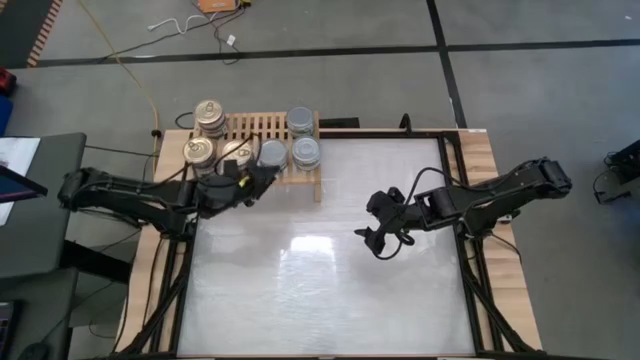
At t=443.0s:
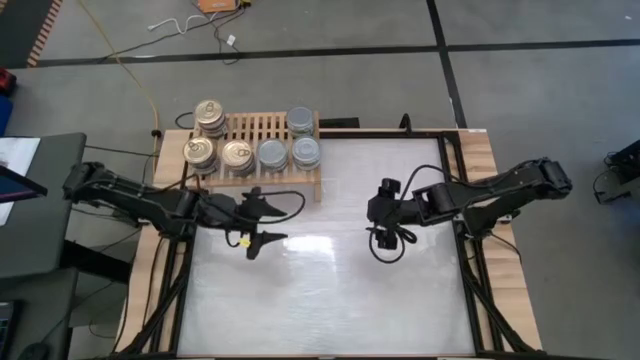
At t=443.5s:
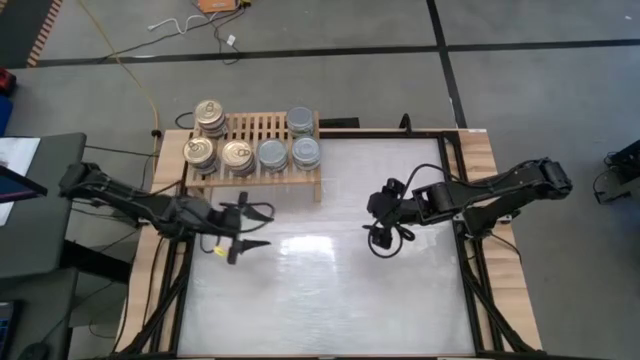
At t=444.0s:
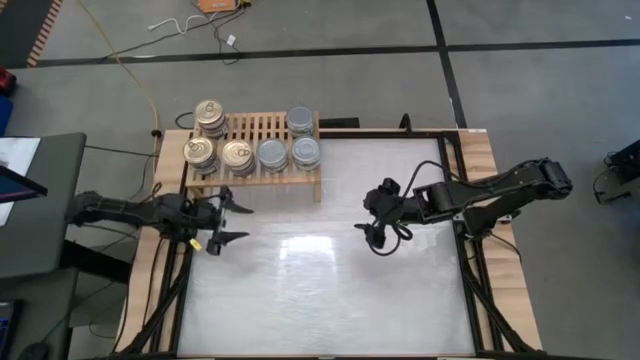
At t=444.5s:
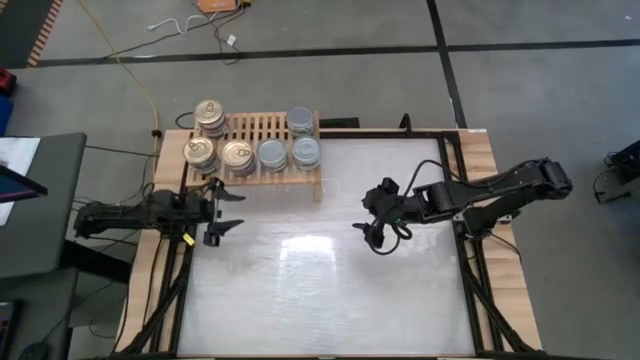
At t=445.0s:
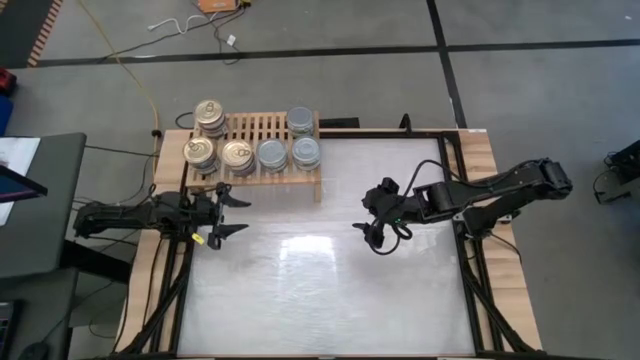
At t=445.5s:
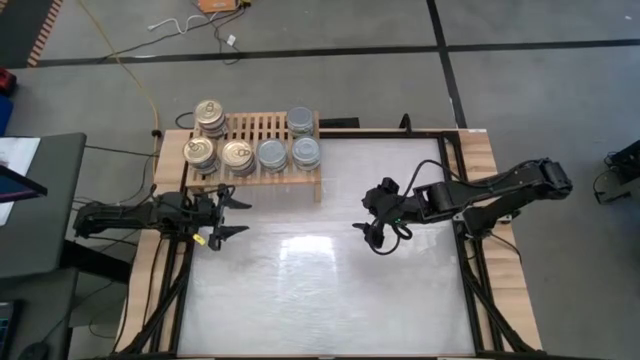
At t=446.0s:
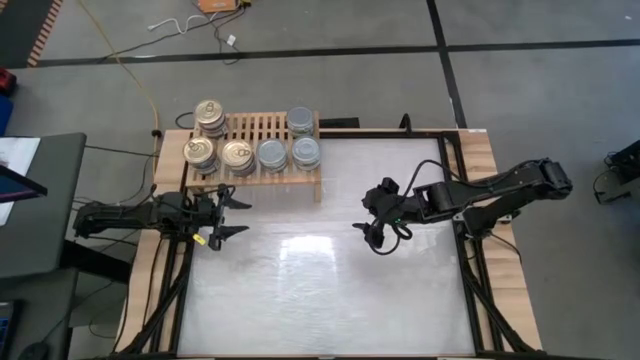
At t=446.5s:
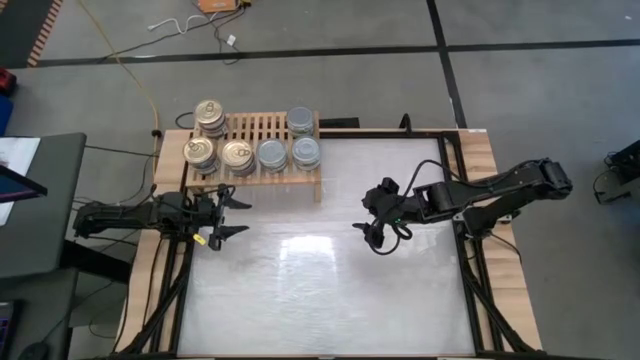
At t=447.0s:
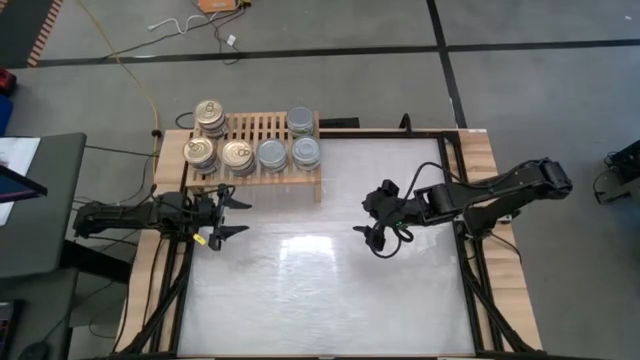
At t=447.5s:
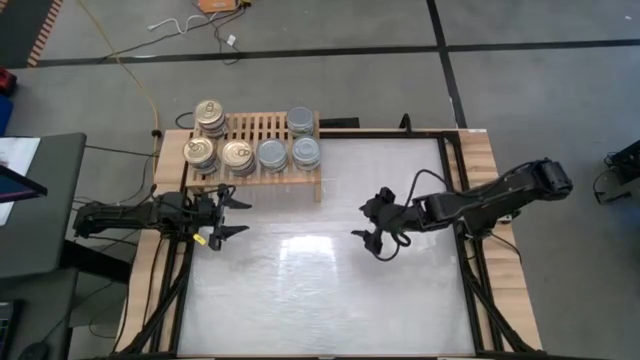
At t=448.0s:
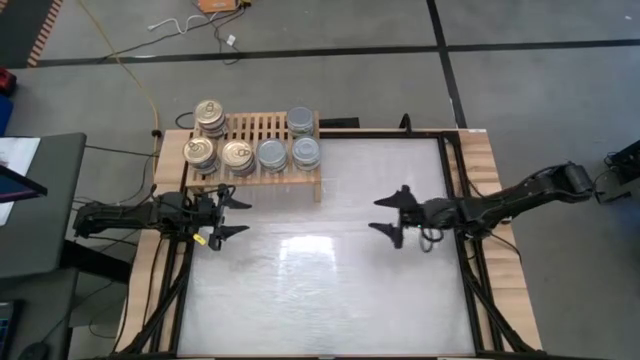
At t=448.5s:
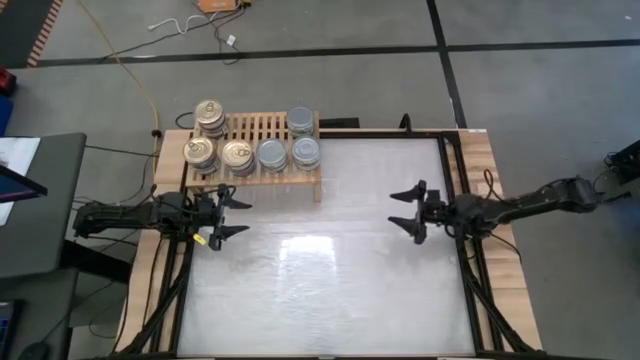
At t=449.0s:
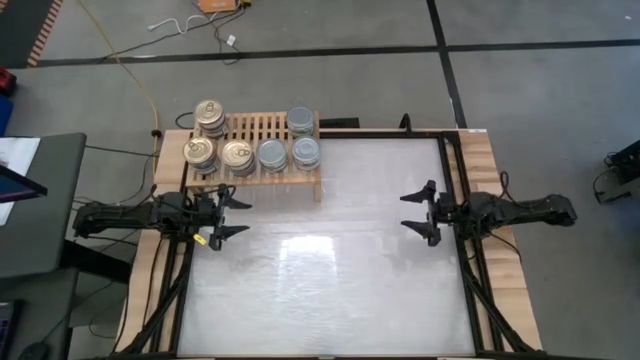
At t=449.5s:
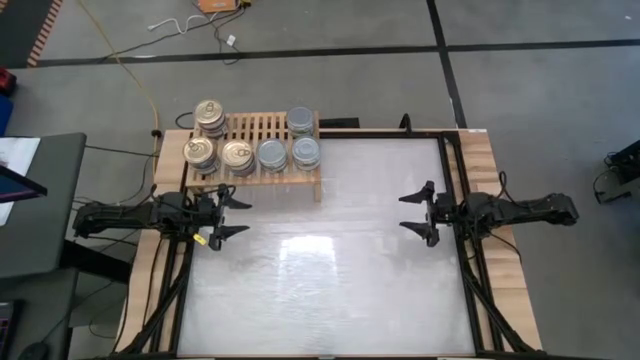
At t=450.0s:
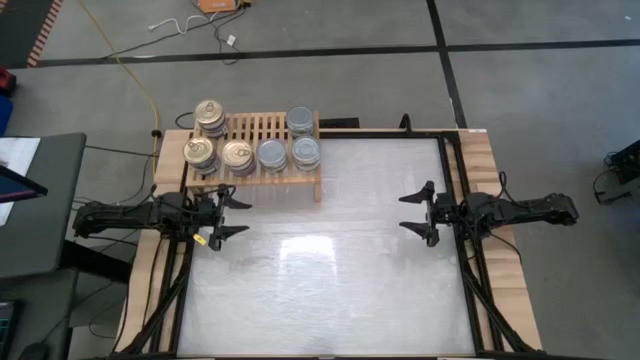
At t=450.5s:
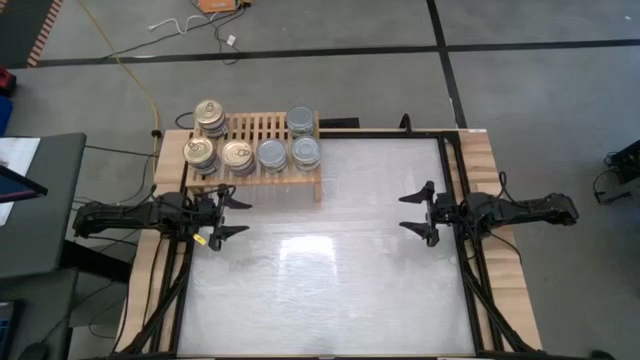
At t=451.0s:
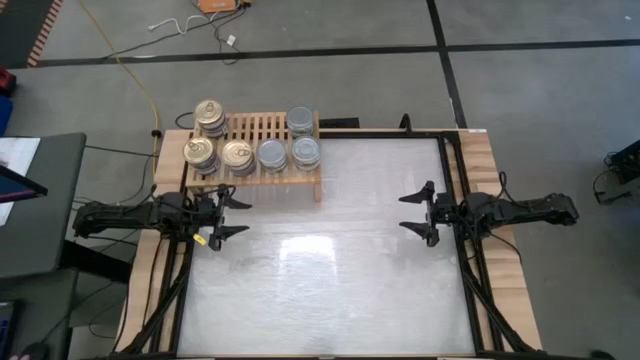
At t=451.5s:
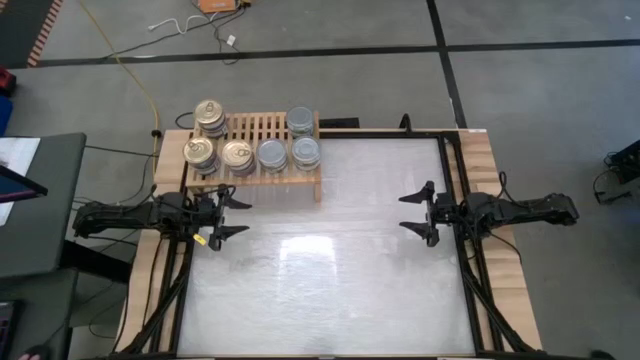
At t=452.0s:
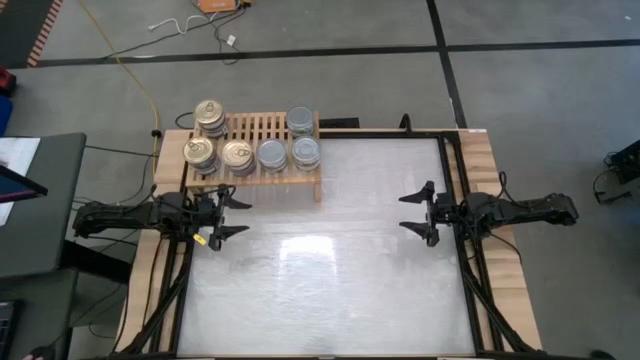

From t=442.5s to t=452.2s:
Task: Stack canned seafood by type on shelf
Return to Home Position

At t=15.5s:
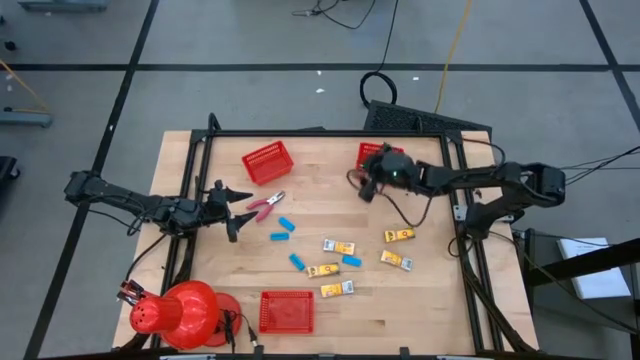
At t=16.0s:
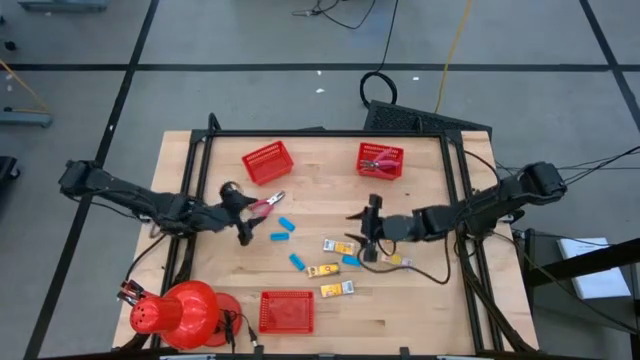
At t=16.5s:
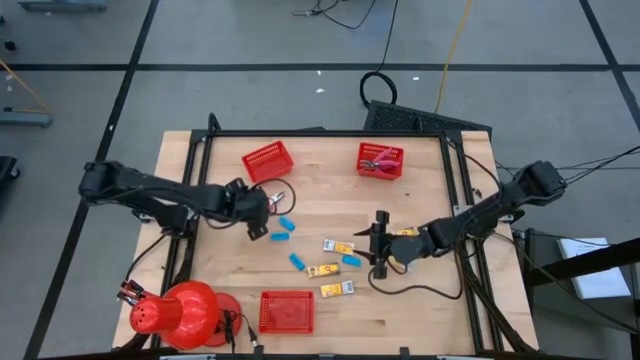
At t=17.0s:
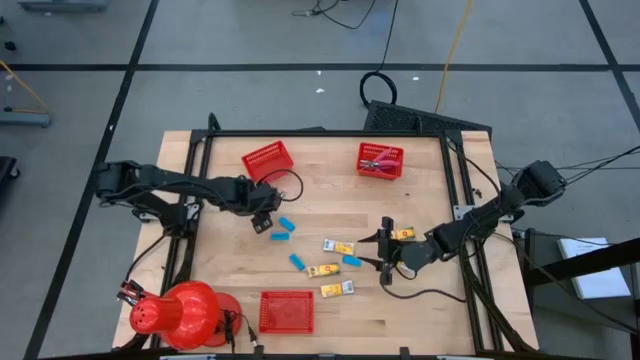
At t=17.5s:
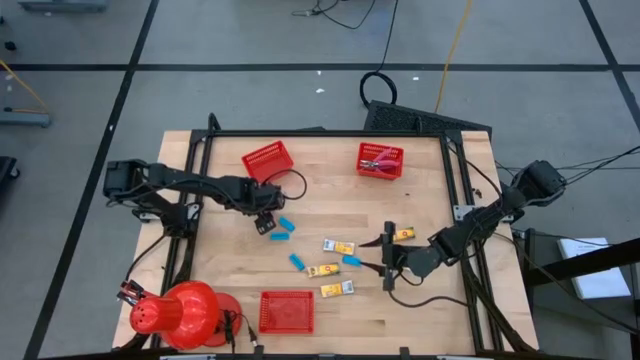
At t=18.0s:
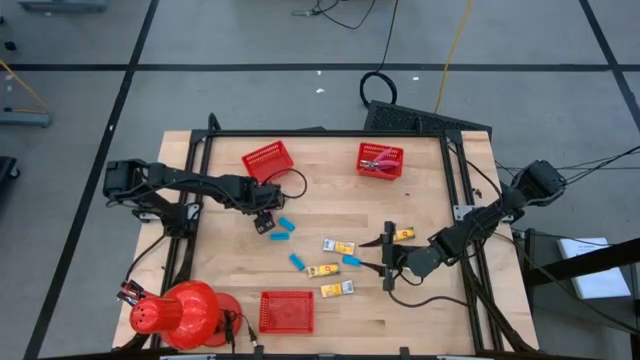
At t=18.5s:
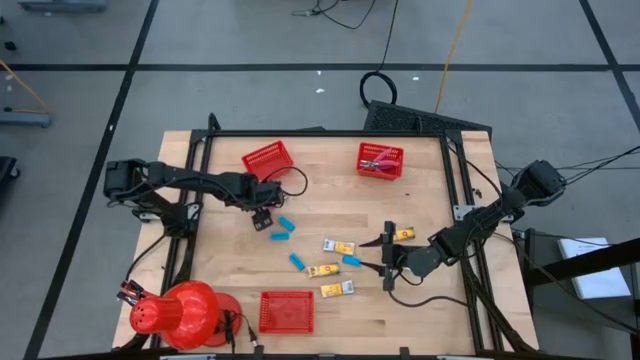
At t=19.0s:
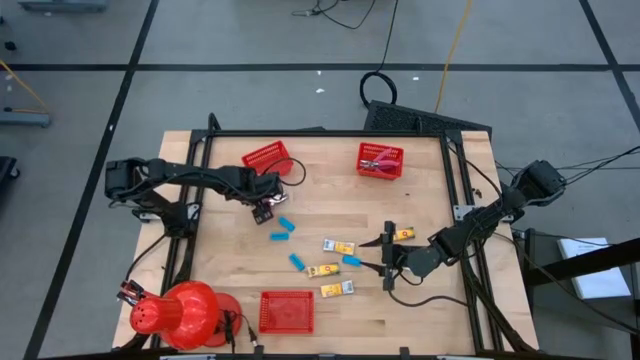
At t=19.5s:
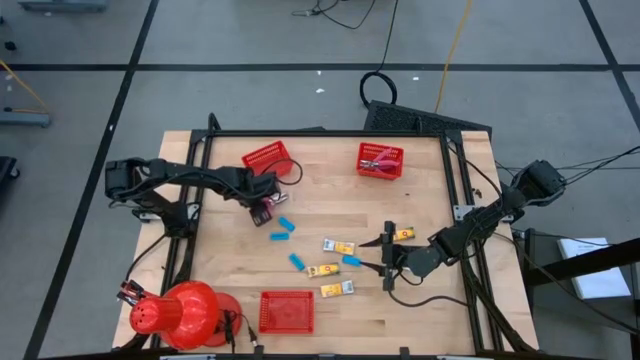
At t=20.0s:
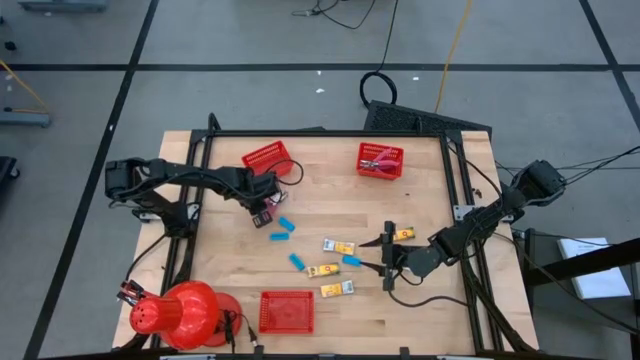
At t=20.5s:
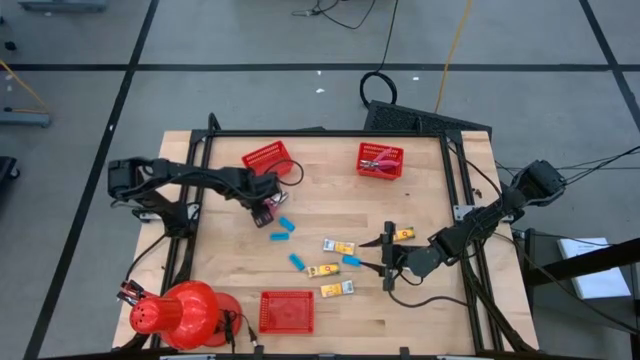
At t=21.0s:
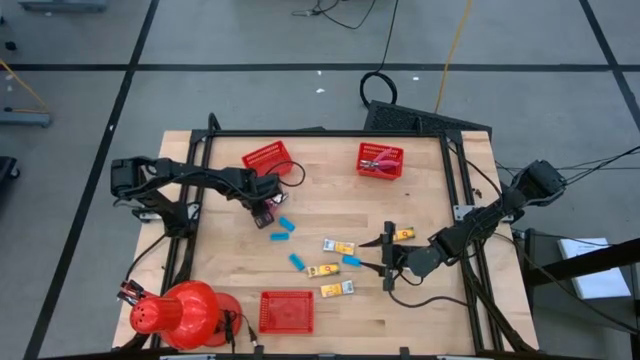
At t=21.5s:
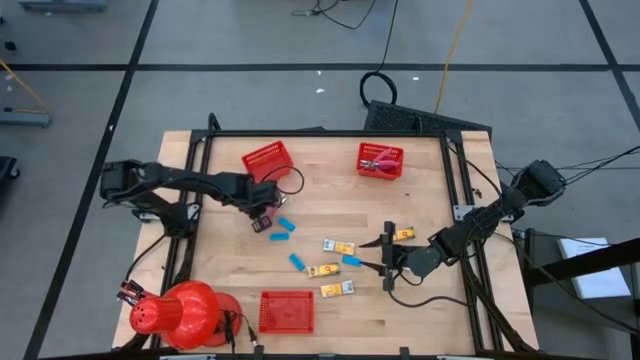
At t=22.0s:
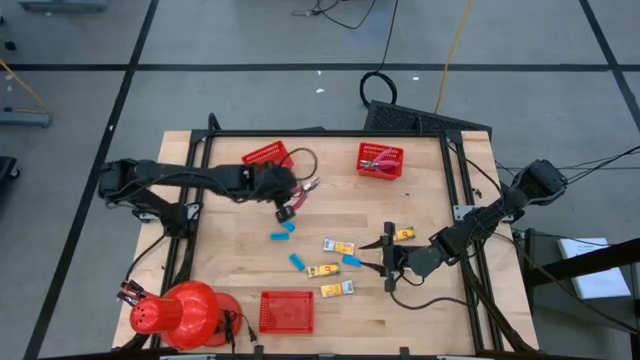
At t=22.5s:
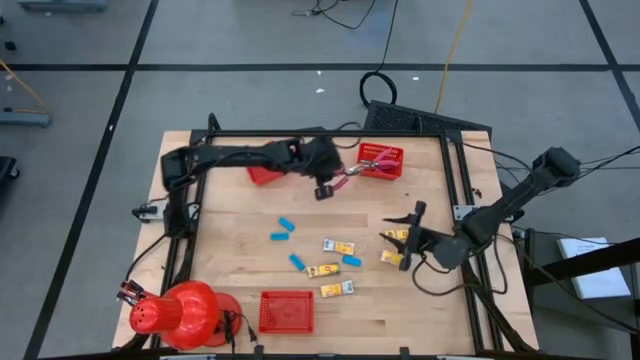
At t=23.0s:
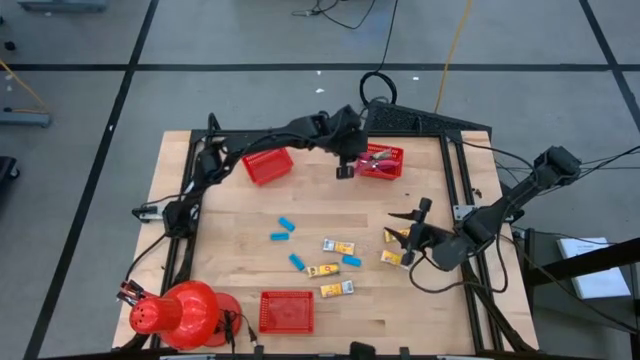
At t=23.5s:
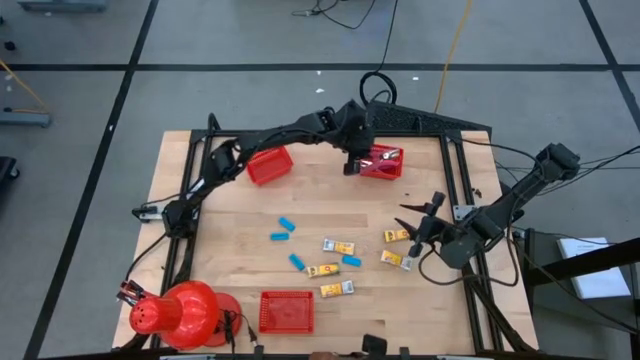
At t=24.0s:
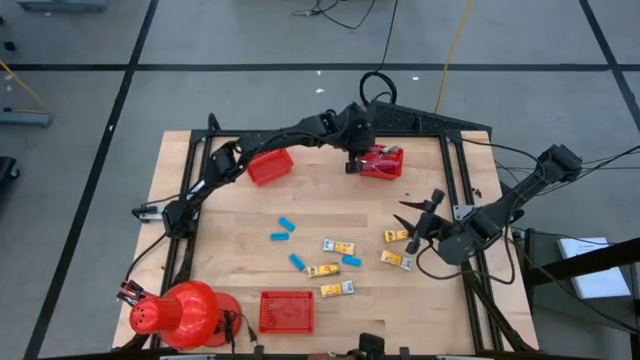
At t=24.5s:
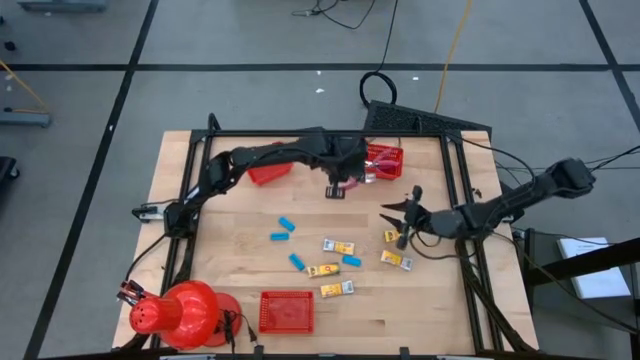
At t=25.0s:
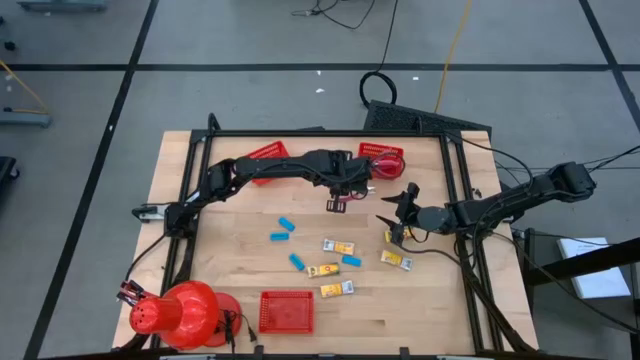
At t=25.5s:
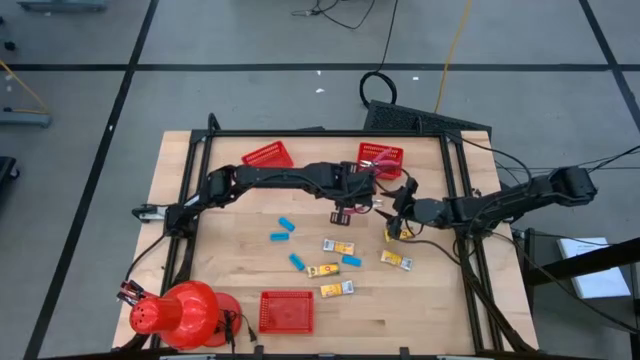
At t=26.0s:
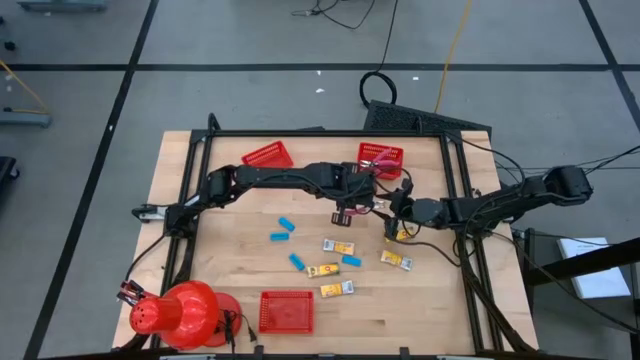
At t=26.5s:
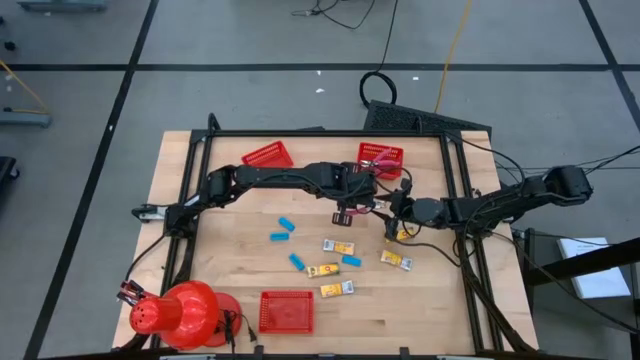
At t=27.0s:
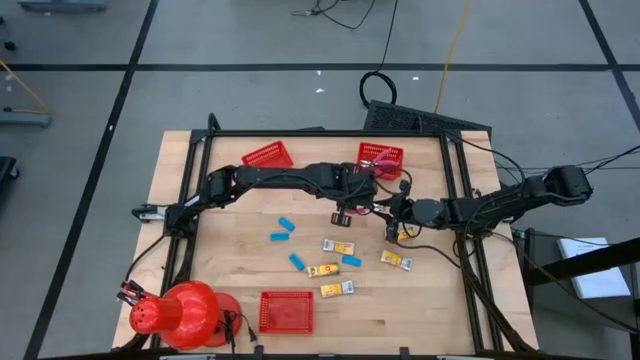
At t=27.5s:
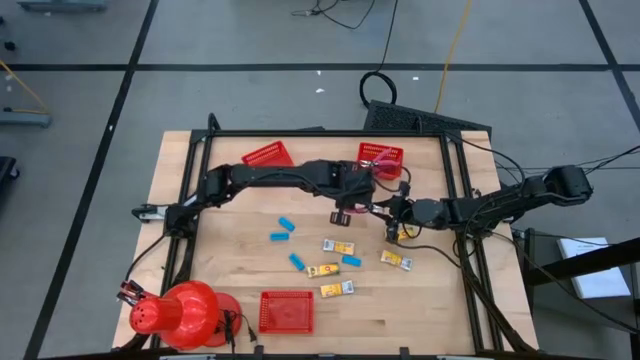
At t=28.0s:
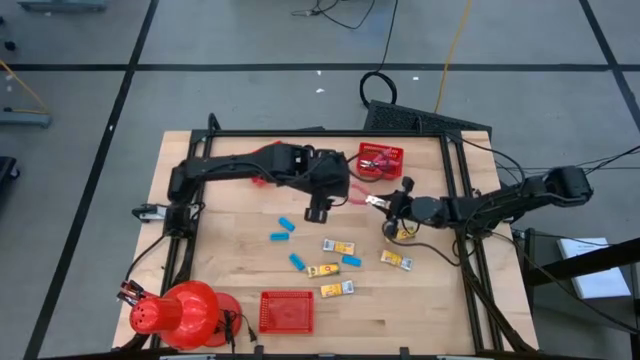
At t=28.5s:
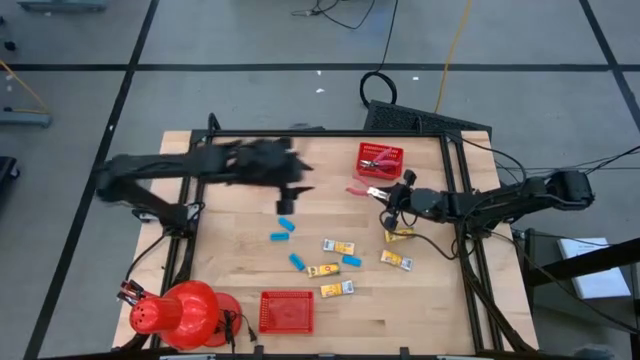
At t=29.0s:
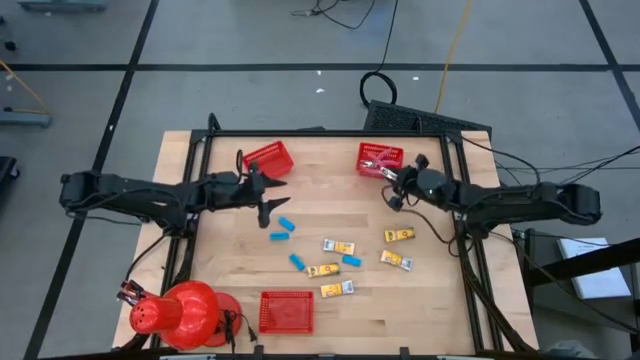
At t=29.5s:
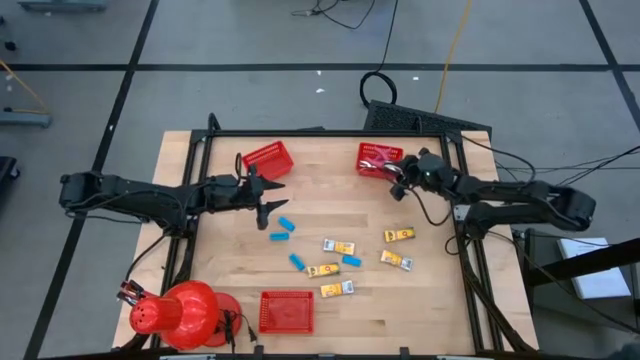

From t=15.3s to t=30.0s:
Task: Pick & Place School Supplies
Put the pink hole puncher into the top right red bin
